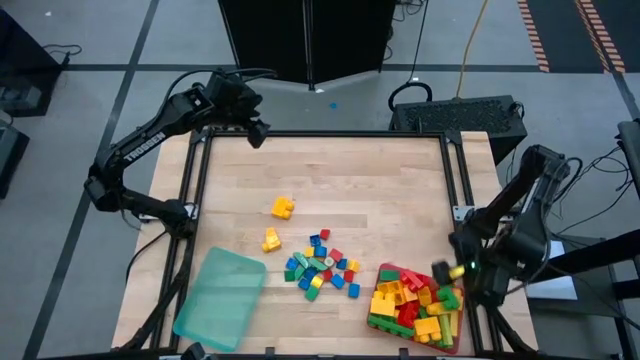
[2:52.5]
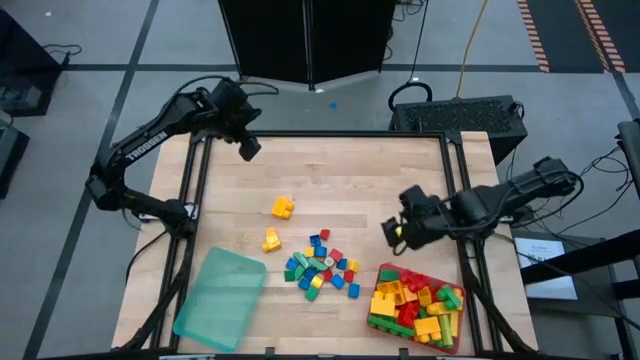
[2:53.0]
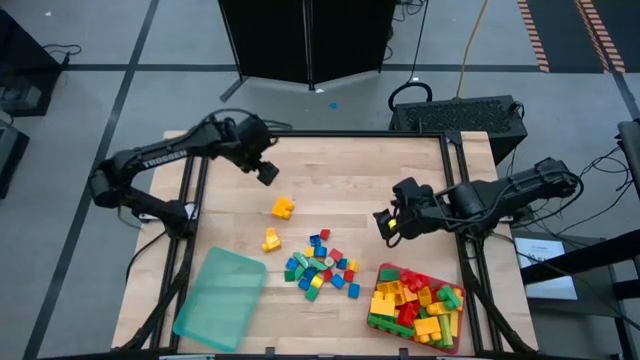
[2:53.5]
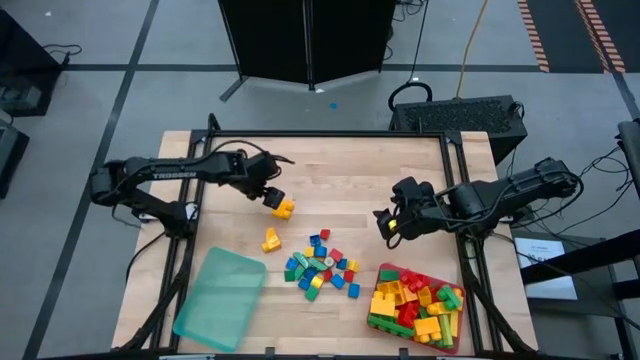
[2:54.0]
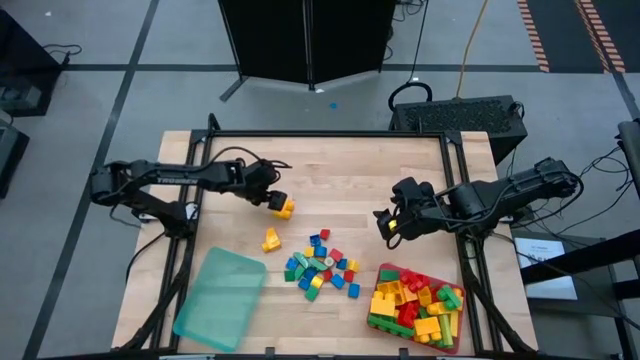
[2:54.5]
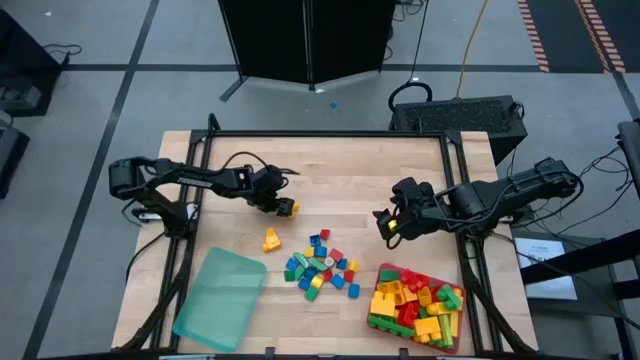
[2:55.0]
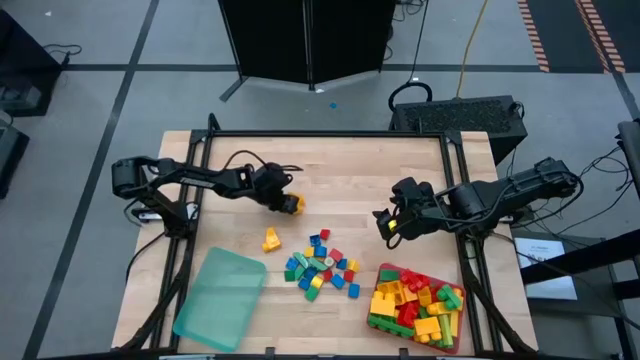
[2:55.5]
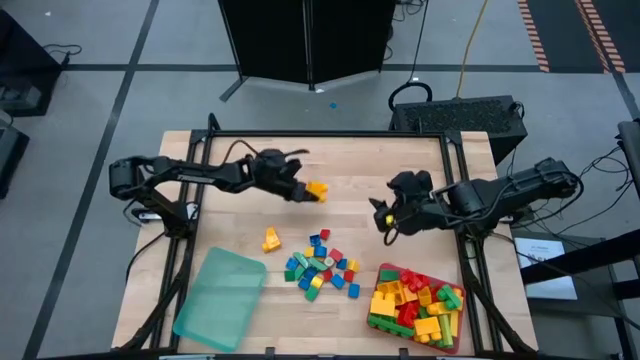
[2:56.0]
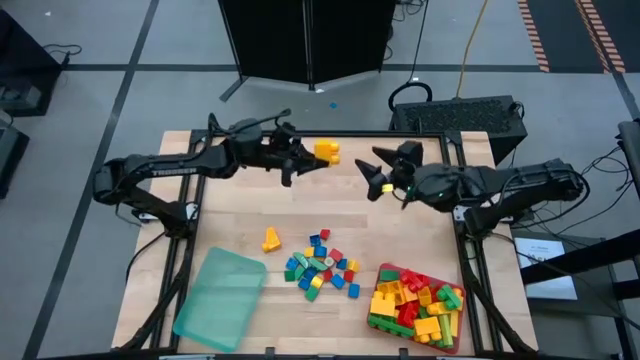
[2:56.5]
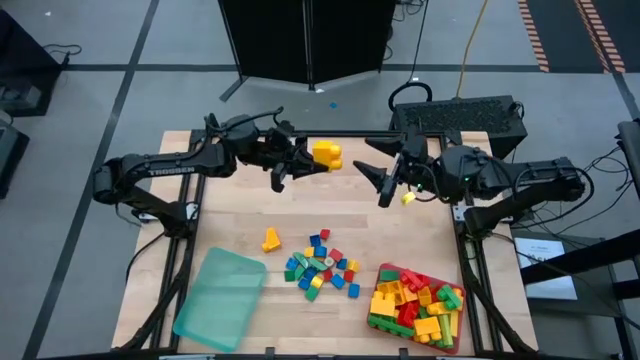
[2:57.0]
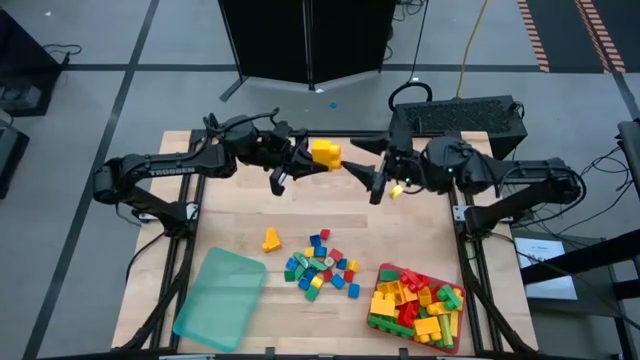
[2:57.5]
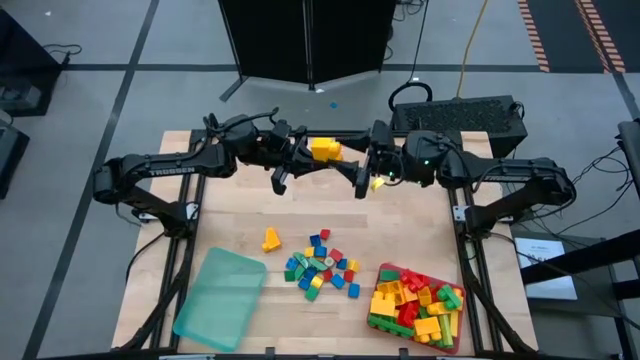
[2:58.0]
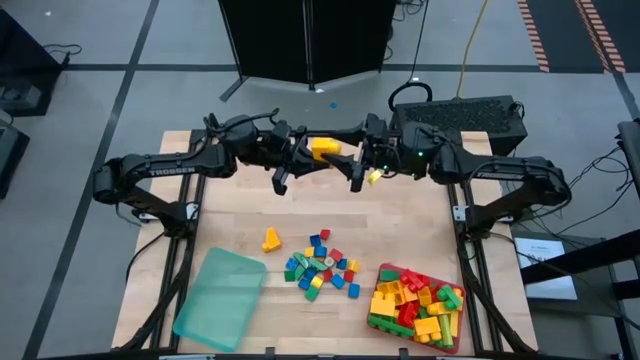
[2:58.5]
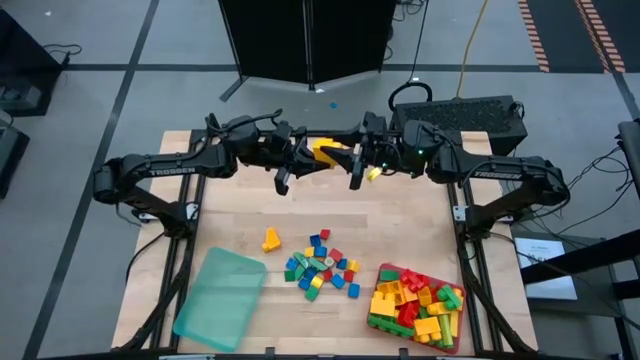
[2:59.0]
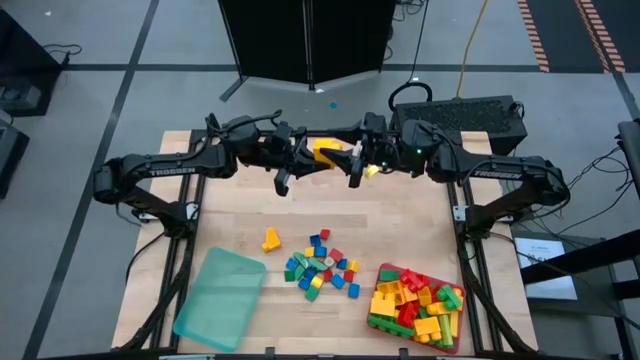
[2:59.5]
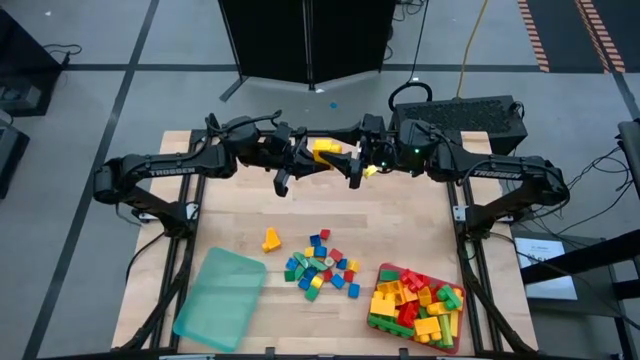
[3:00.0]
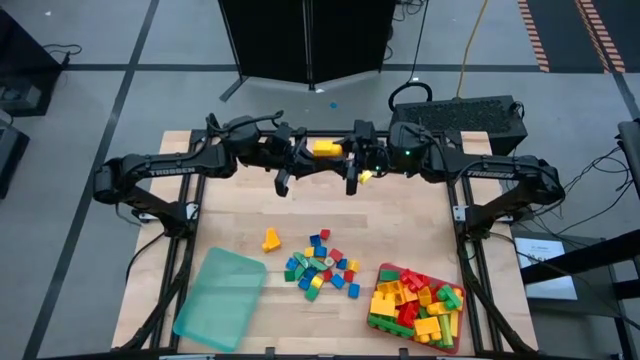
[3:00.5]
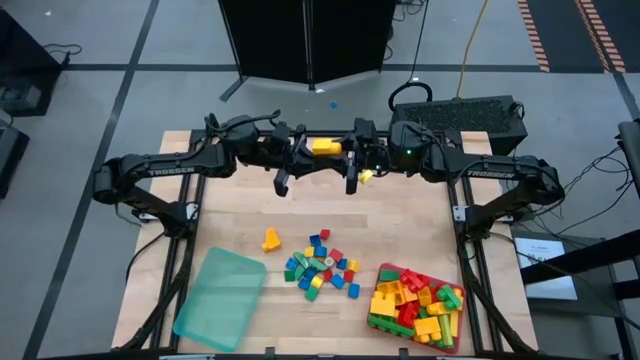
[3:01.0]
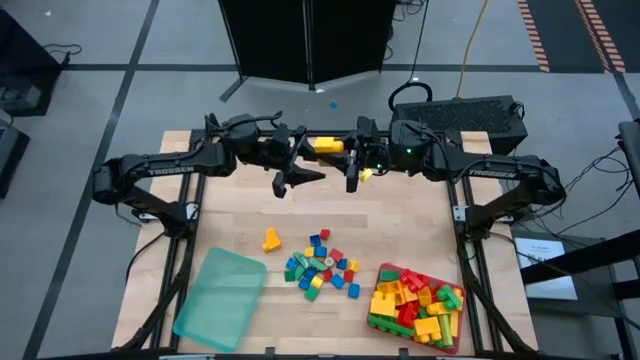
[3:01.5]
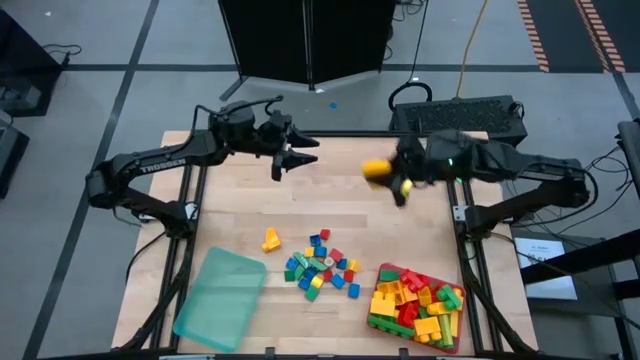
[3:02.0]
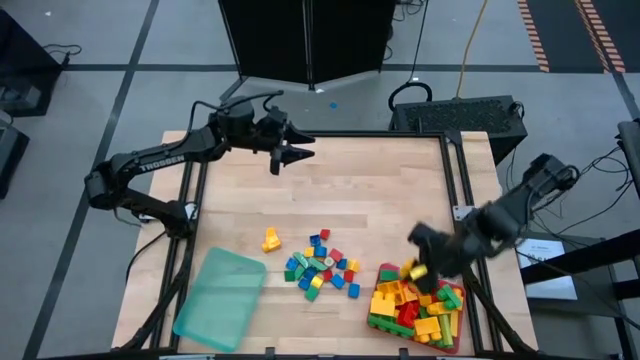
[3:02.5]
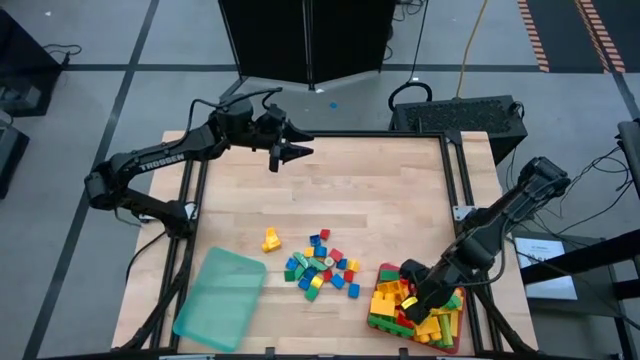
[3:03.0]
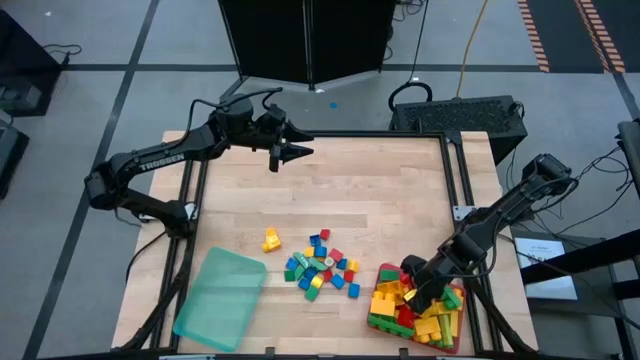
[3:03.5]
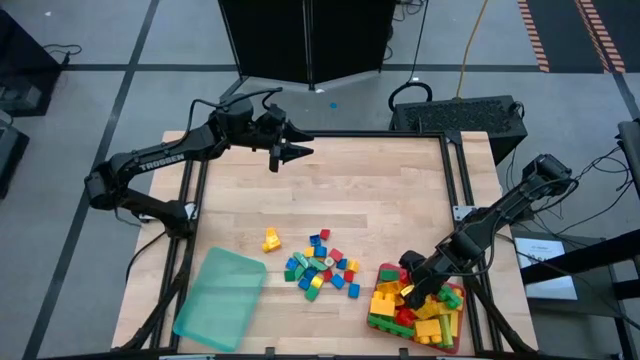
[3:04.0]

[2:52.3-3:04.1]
Task: Sort blocks by size
Put the 2-stud yellow game piece into the pink bin

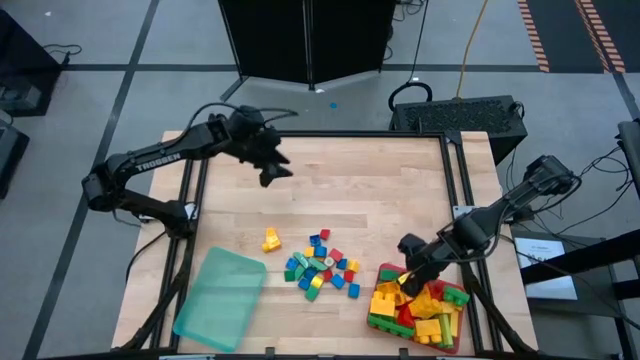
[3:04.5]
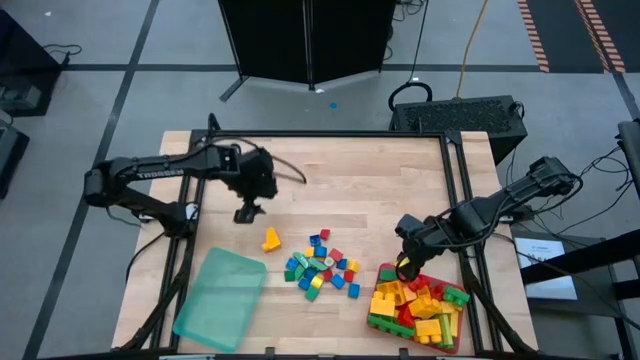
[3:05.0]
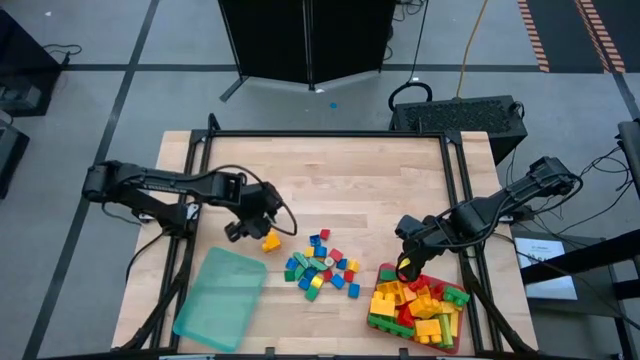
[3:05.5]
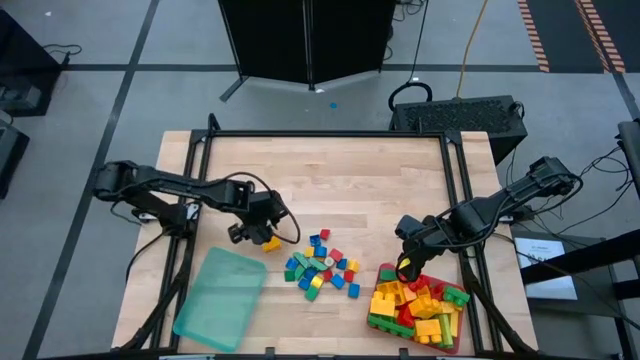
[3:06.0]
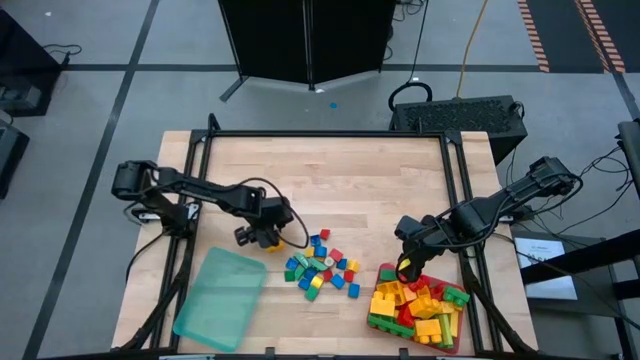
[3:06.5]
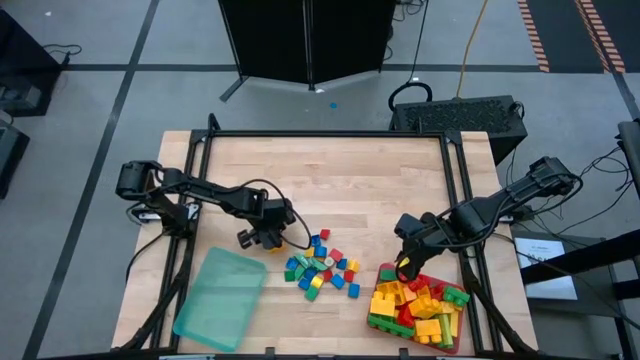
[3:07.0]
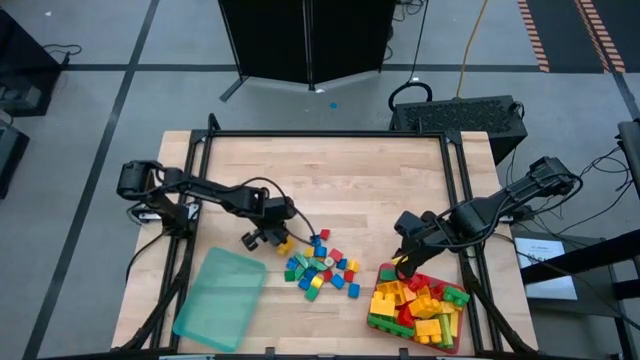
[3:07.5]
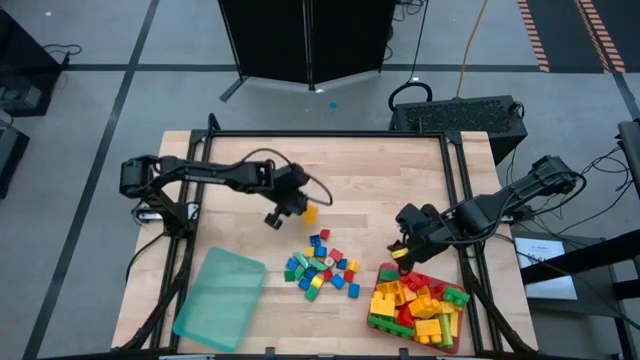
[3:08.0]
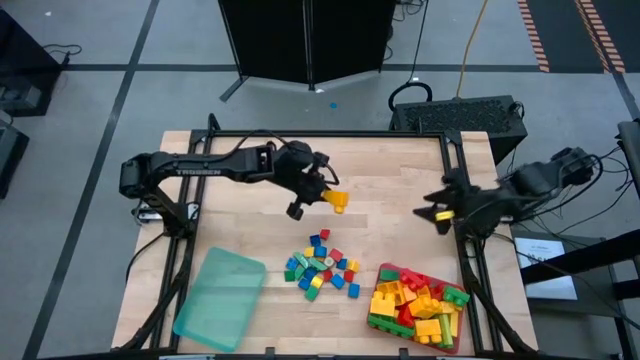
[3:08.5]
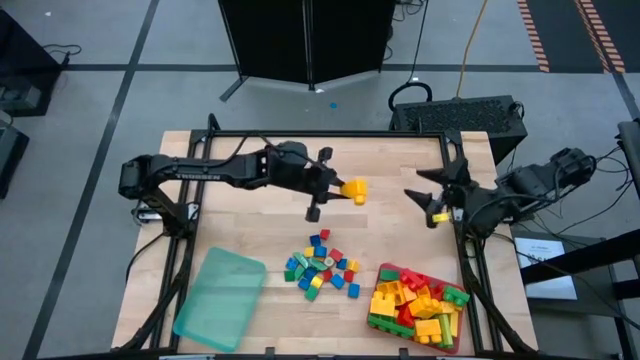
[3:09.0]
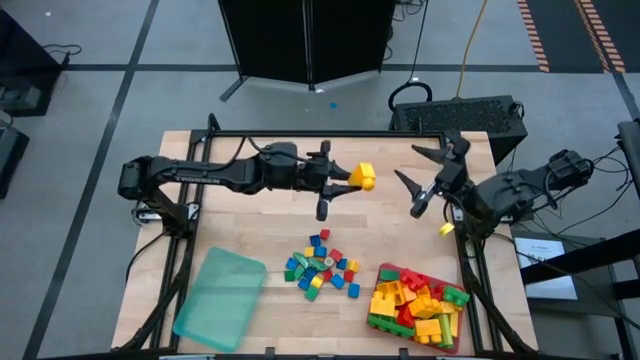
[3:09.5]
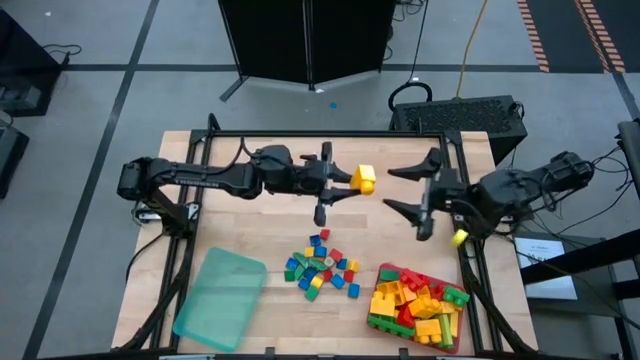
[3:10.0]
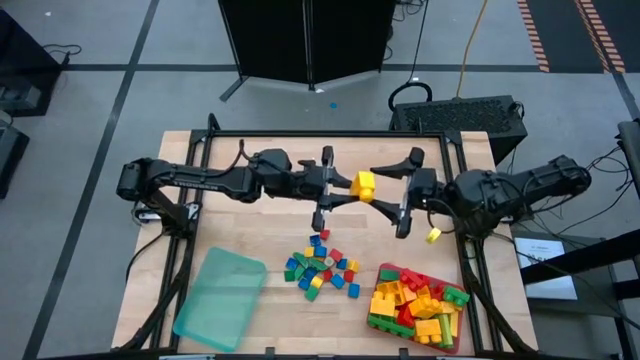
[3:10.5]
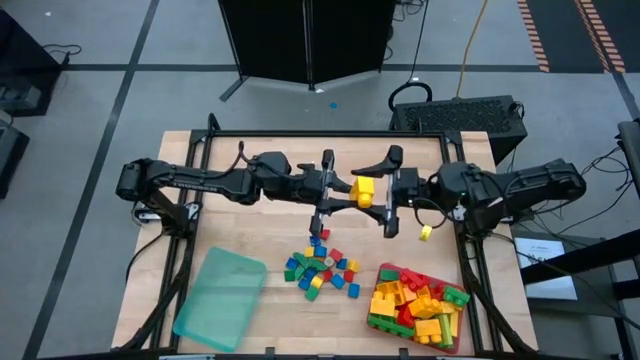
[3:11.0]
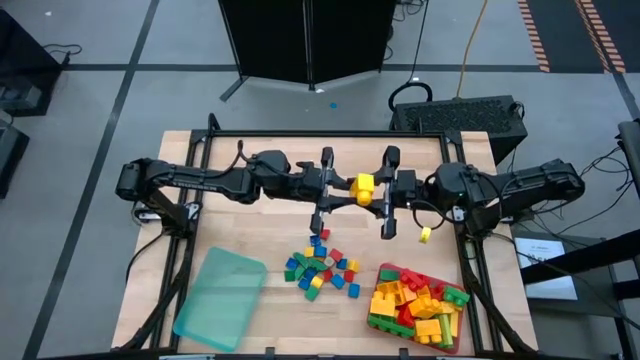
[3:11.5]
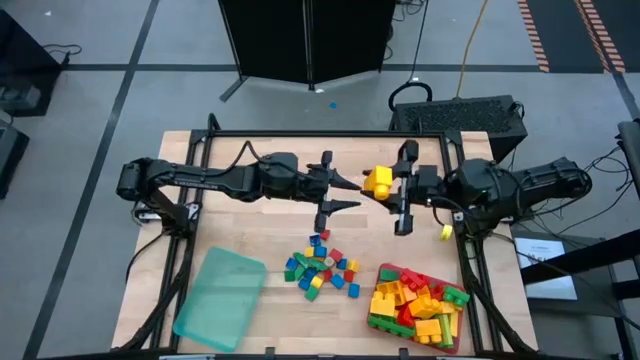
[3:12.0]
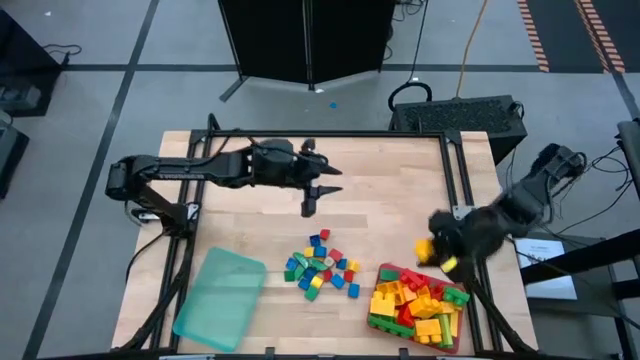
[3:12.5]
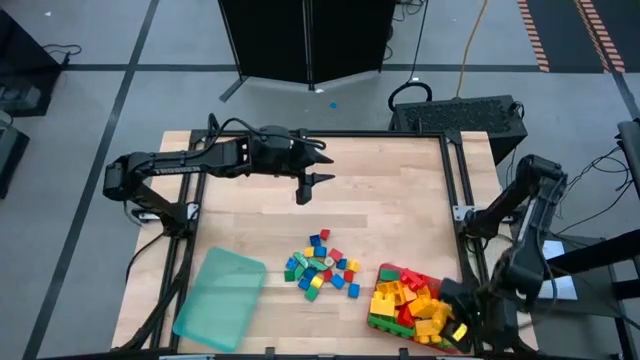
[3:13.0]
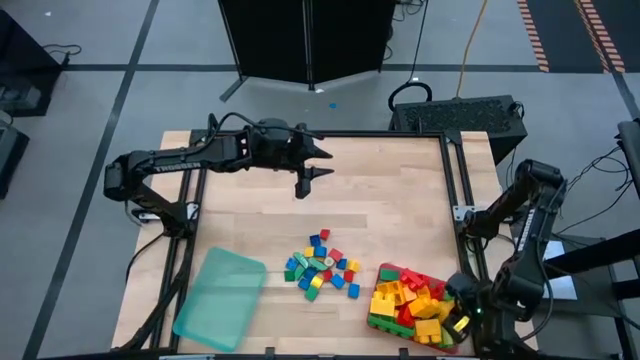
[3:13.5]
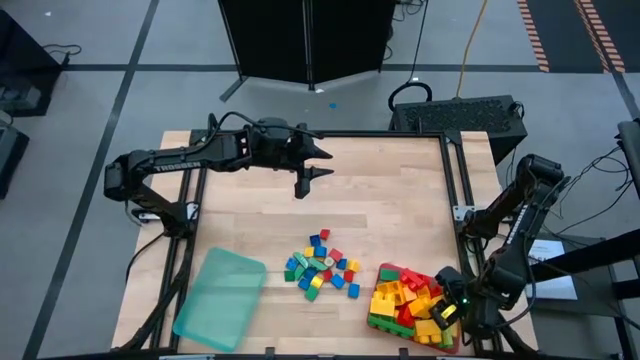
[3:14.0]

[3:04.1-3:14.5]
Put the 2-stud yellow game piece into the pink bin

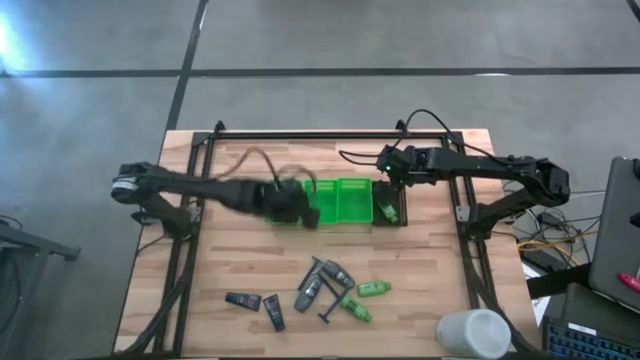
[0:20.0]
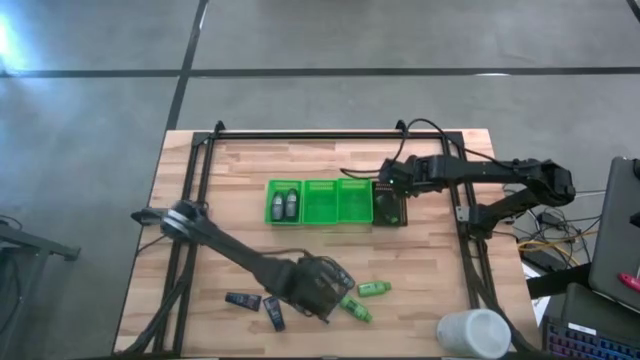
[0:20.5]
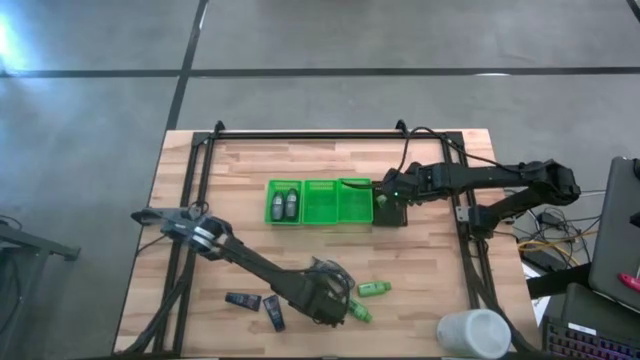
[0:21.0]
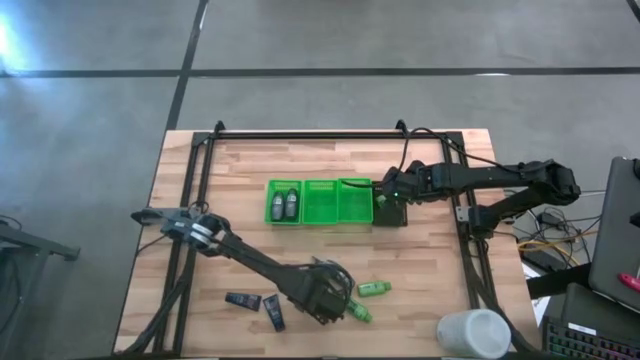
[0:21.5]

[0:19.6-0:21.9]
Task: Pick & Place Travel size toiletries
Put the deodorant into the left green bin
